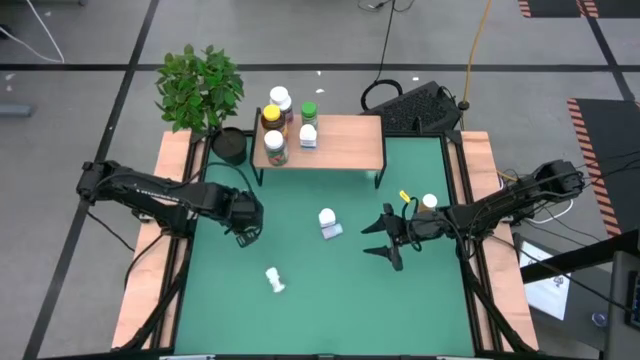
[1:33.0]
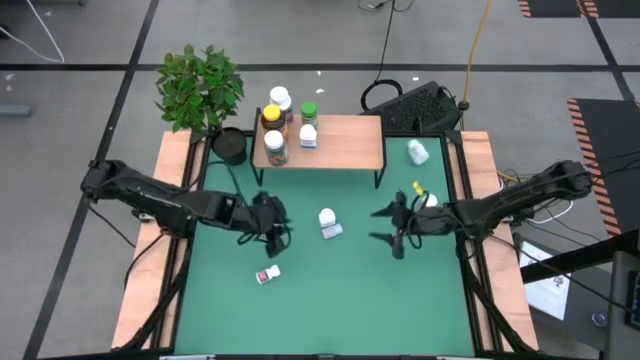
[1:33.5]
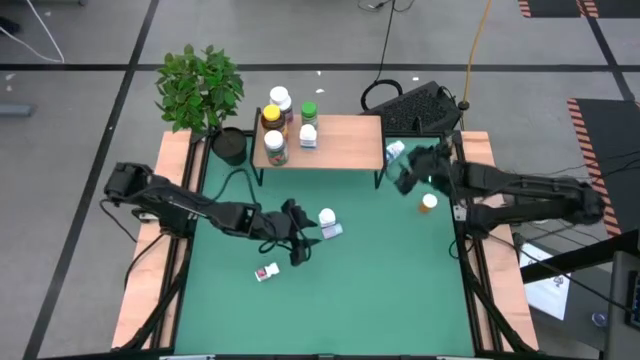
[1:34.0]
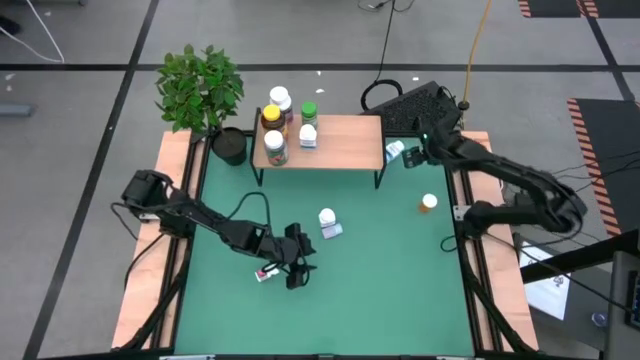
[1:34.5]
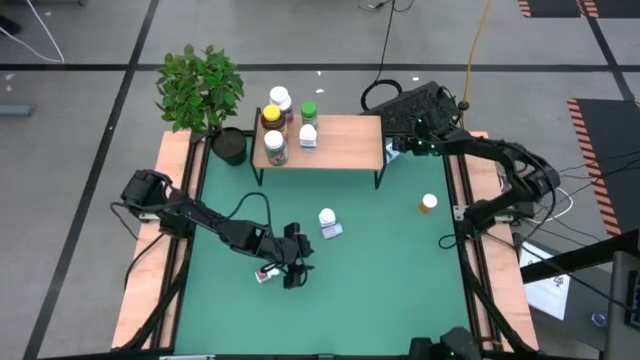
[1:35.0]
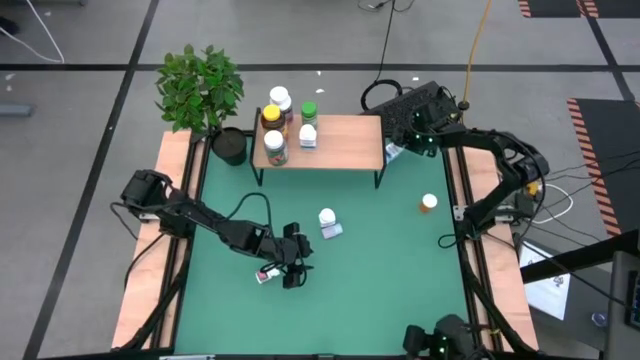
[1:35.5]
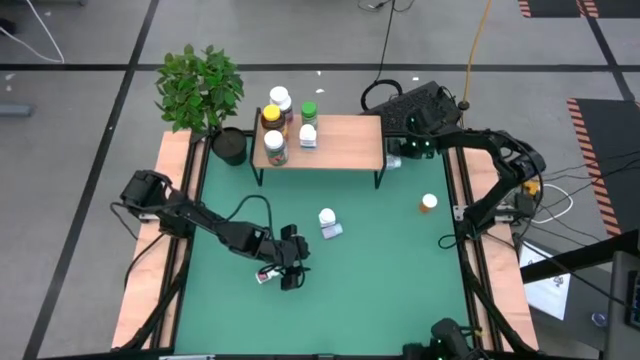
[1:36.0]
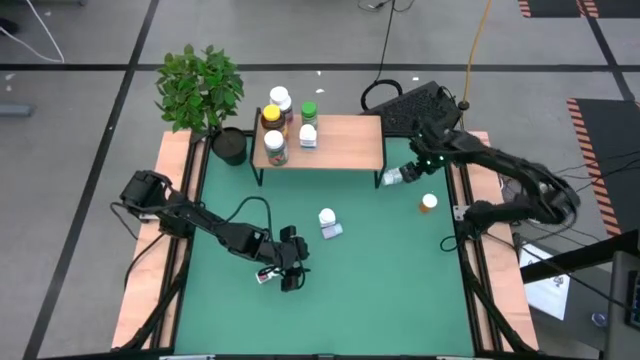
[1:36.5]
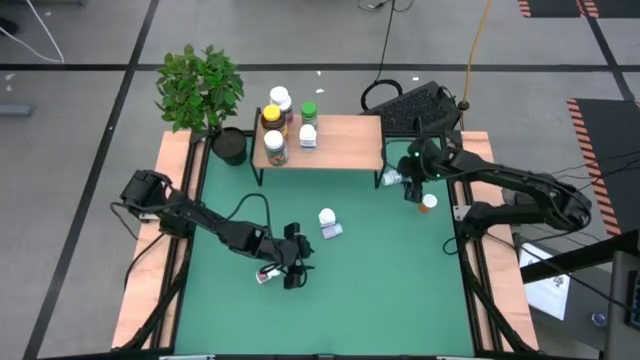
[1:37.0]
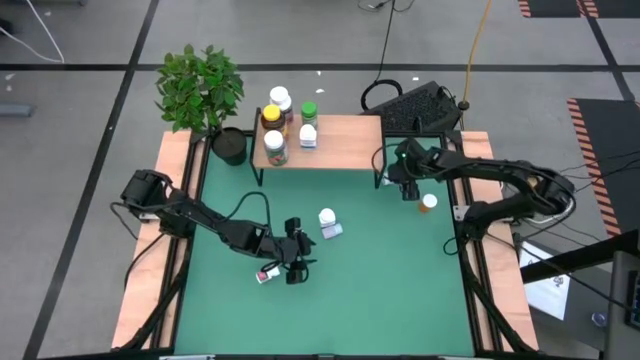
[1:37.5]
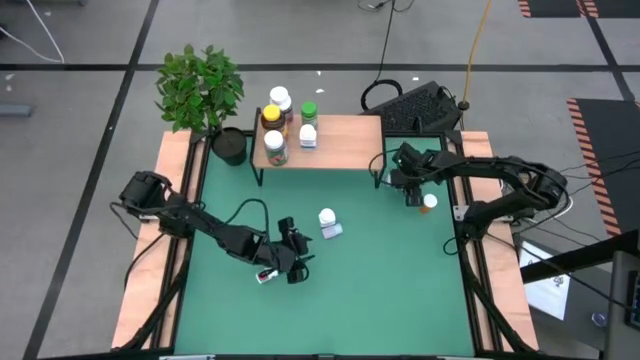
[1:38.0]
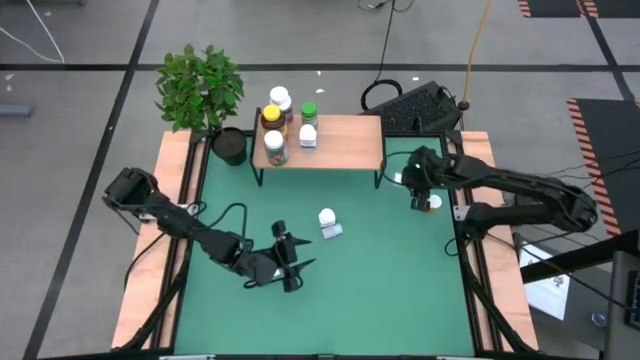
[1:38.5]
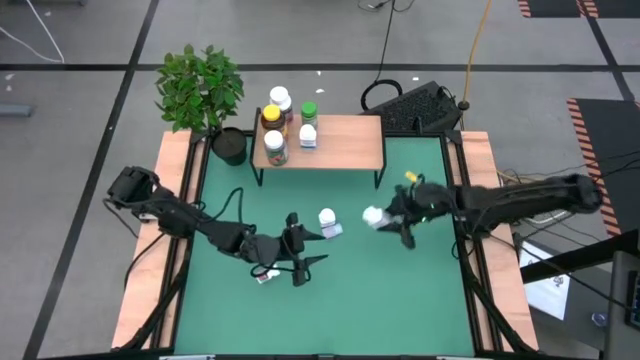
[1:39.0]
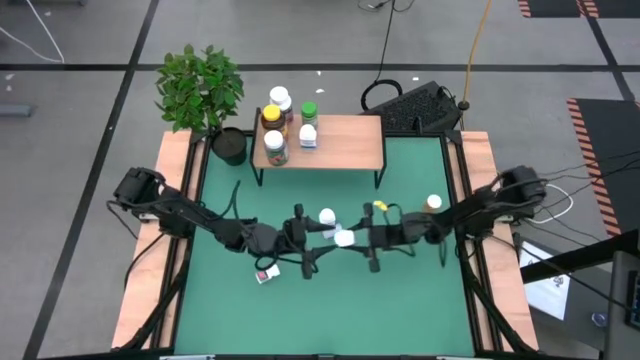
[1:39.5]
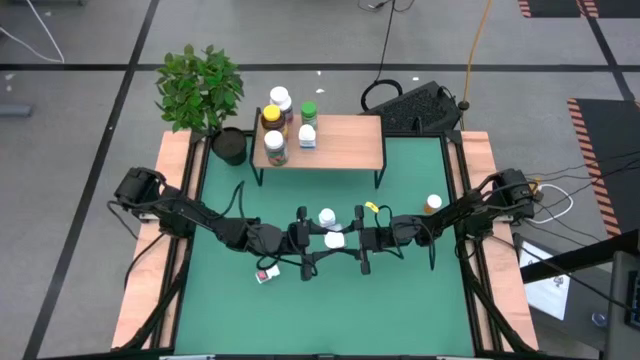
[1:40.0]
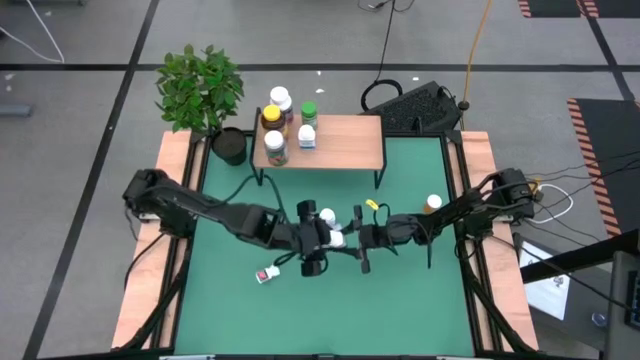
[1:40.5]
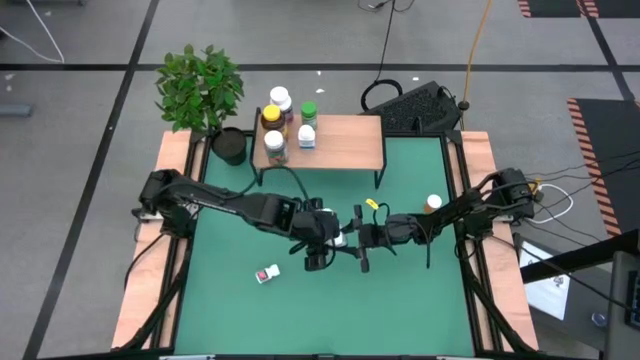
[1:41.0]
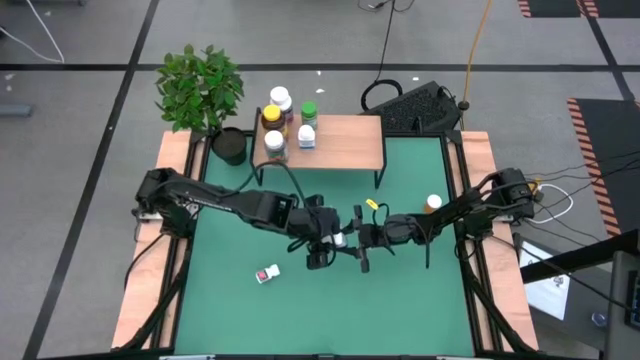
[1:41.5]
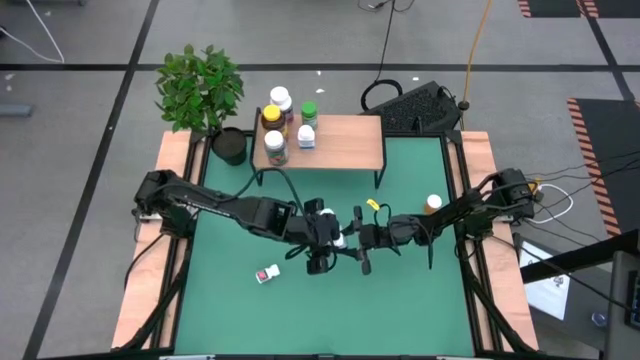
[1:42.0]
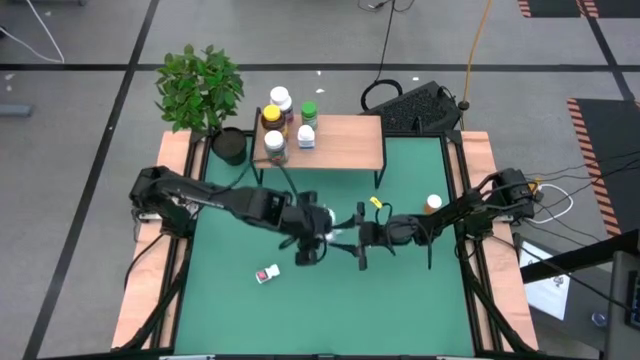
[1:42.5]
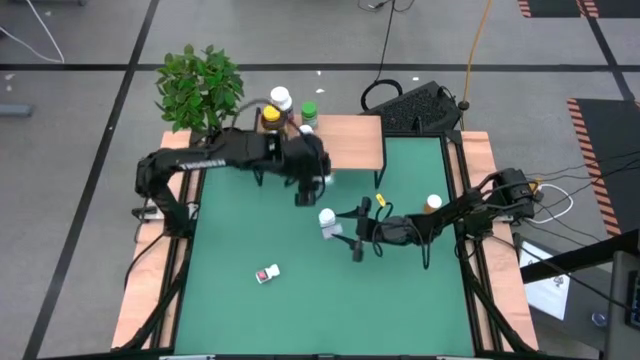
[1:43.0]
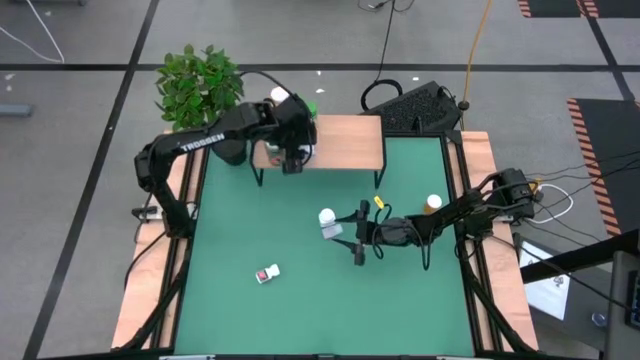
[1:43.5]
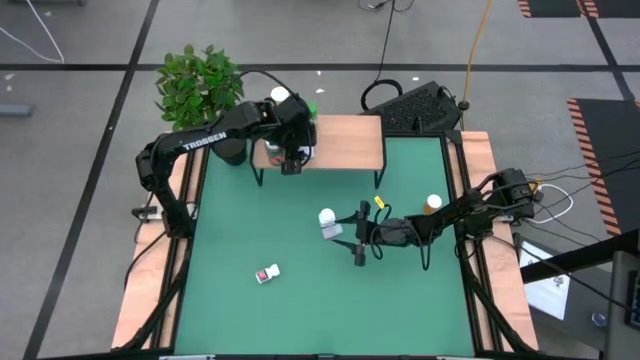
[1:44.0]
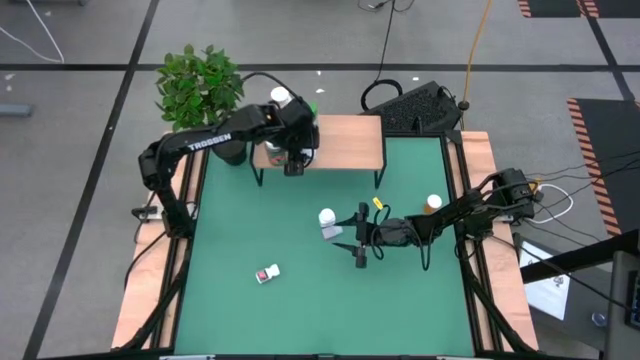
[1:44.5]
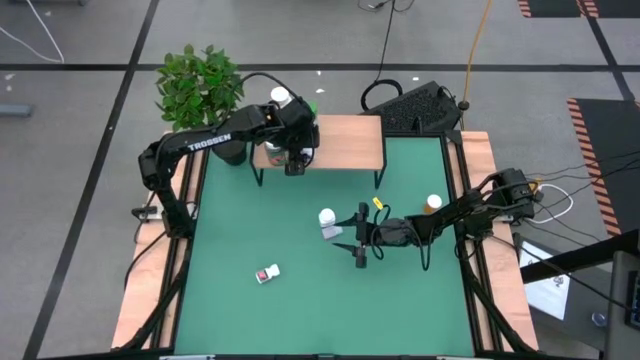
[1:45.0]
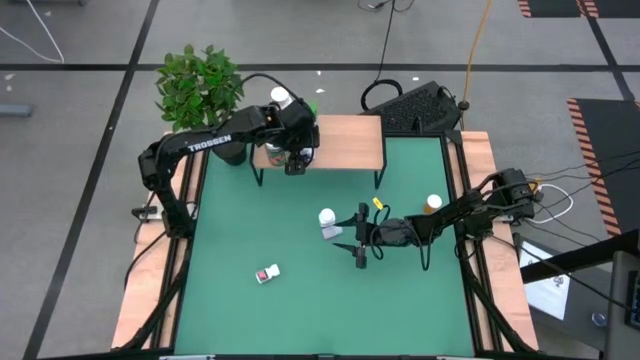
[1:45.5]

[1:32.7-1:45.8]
Task: Pick and place medicine bottles onto shelf by color
Put the right small white pill bottle on the shelf

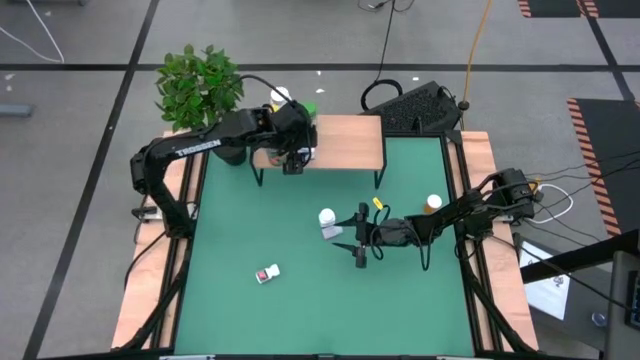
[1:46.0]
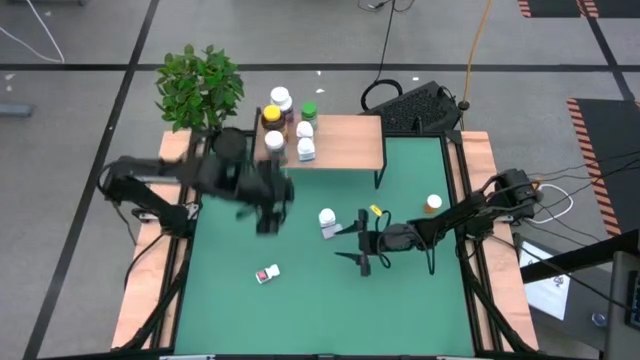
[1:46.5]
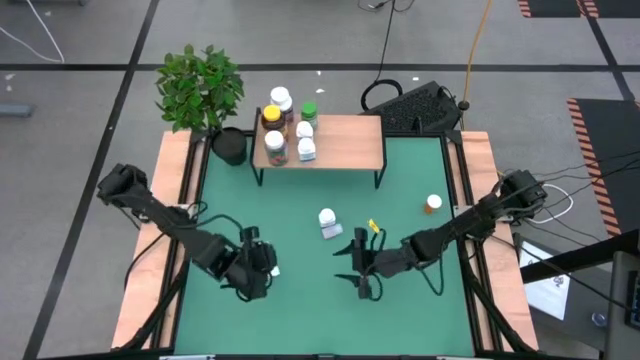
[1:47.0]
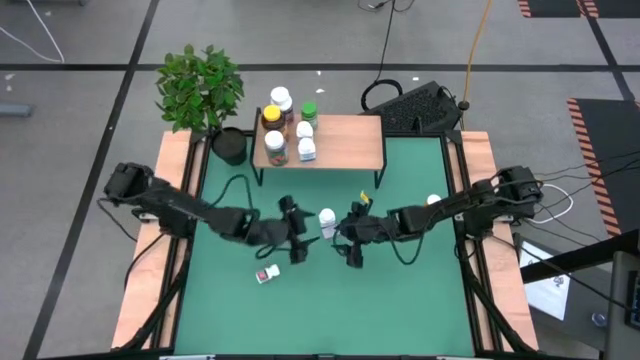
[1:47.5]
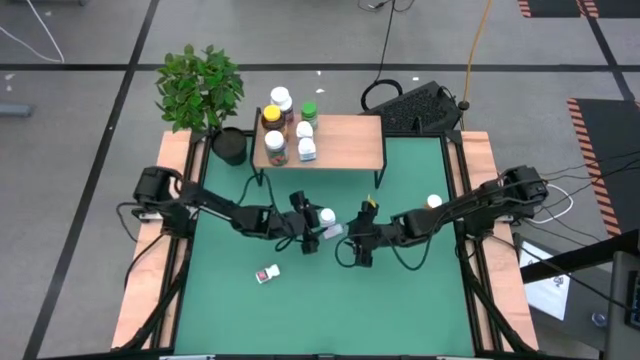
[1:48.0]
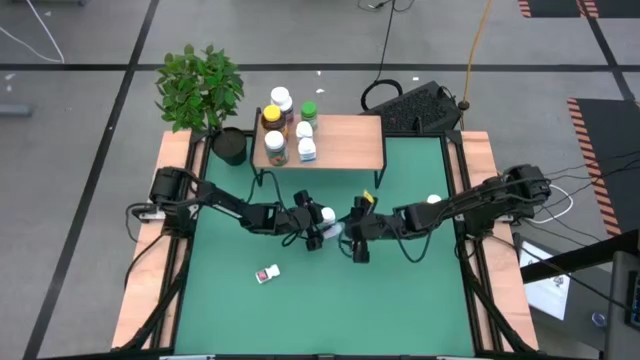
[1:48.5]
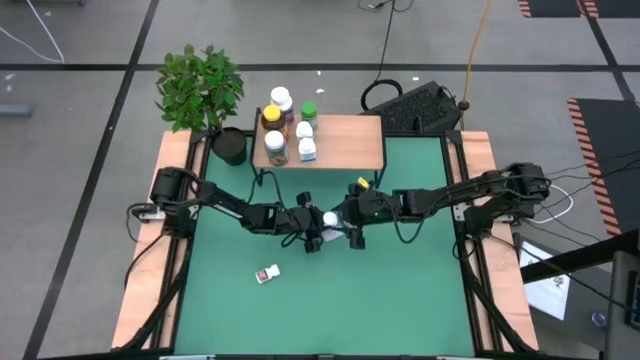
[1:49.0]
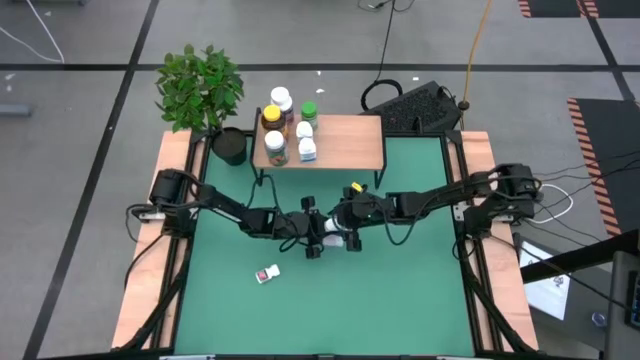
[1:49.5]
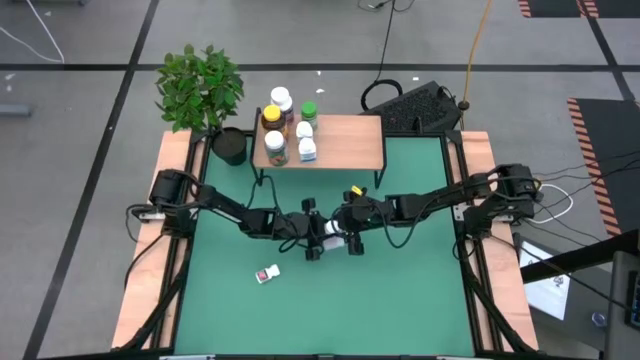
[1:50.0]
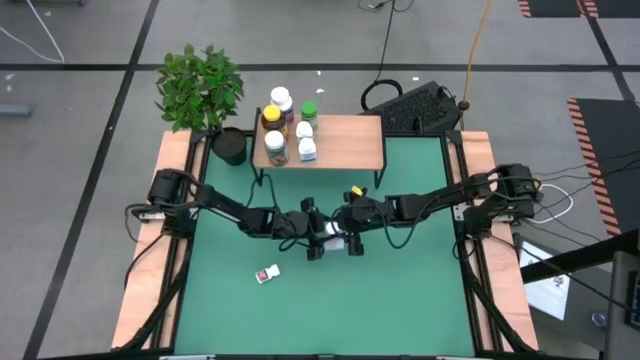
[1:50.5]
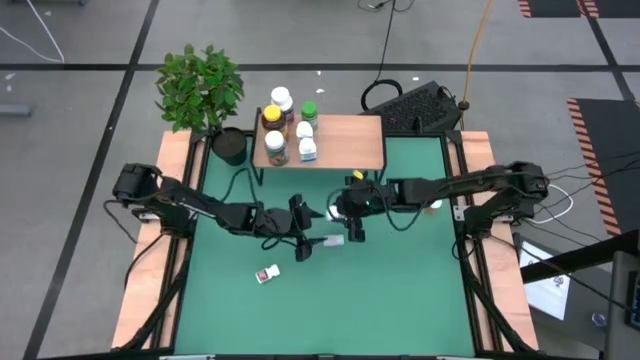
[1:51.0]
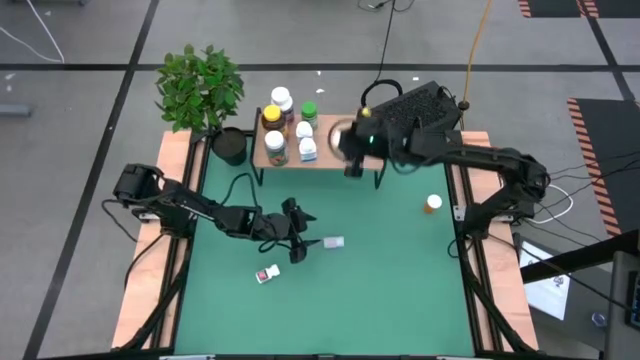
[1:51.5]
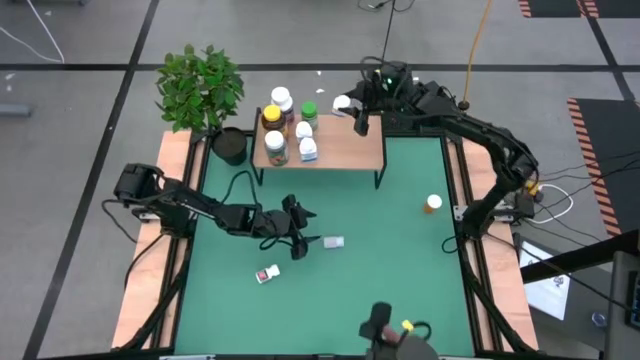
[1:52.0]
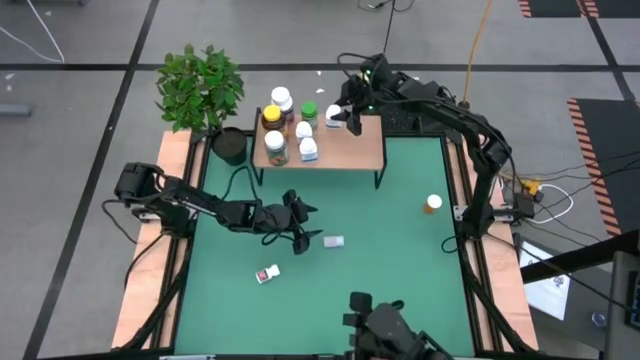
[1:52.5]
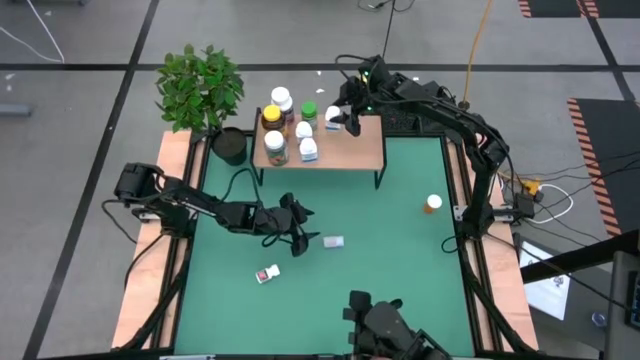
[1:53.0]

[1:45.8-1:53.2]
Put the small white pill bottle on the shelf

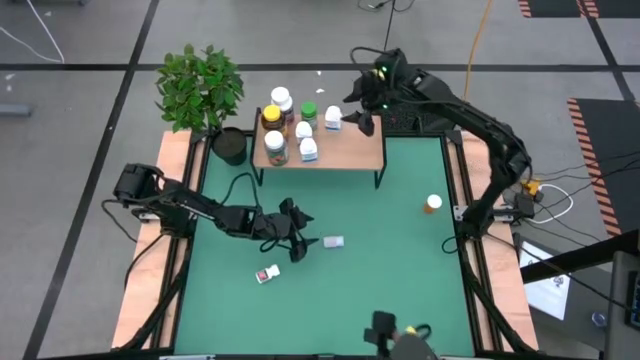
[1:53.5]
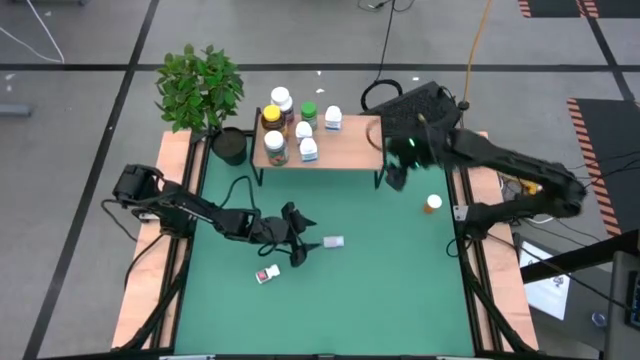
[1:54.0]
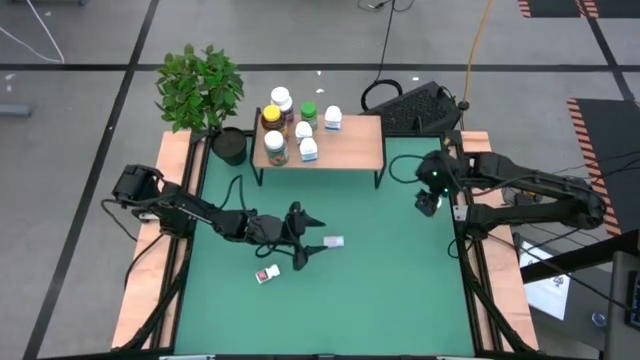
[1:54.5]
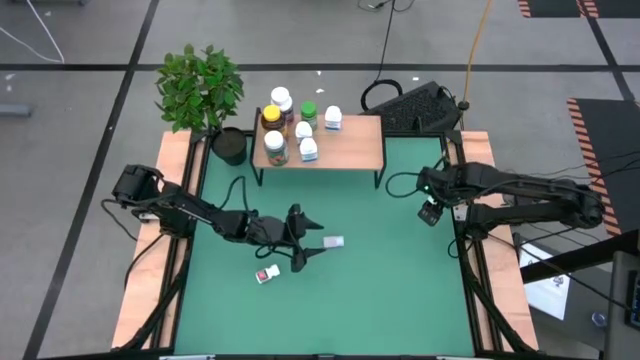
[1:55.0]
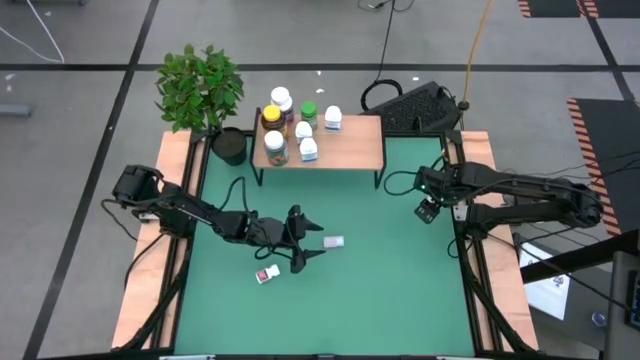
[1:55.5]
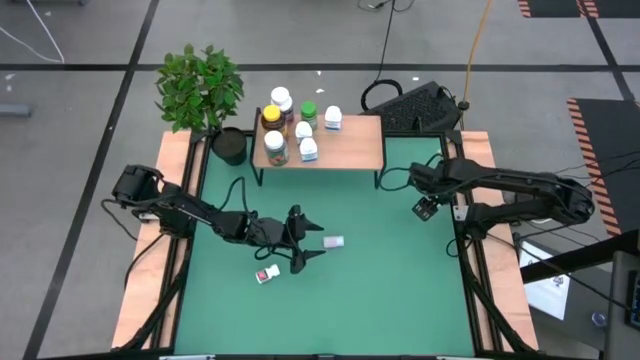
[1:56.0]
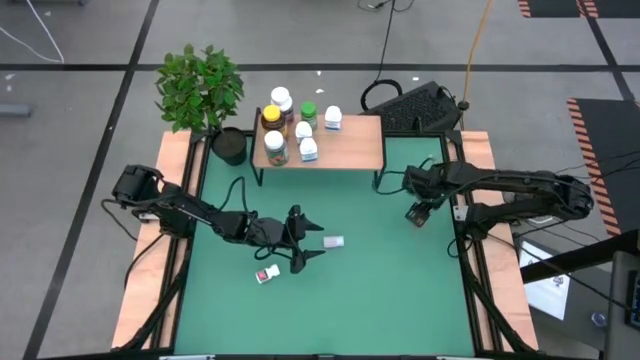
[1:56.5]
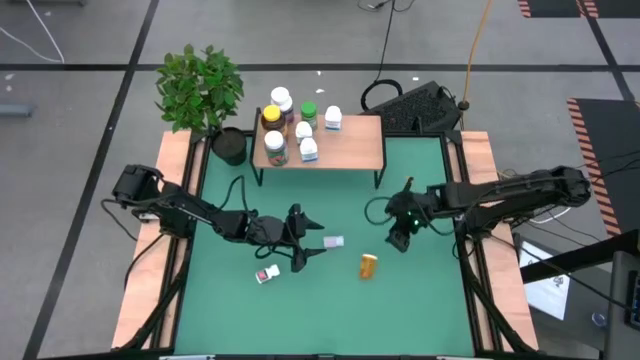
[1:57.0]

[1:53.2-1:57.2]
Put the orange pill bottle on the shelf
